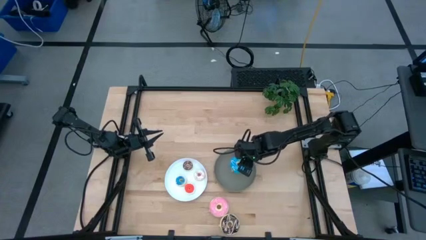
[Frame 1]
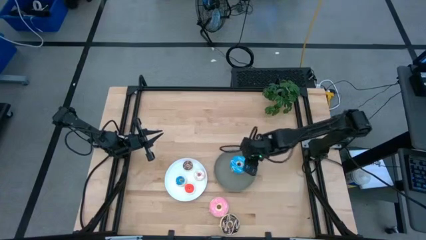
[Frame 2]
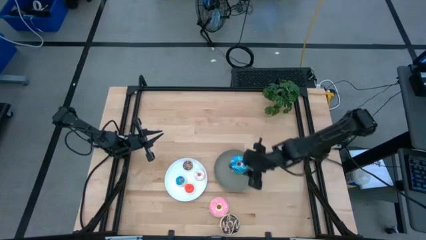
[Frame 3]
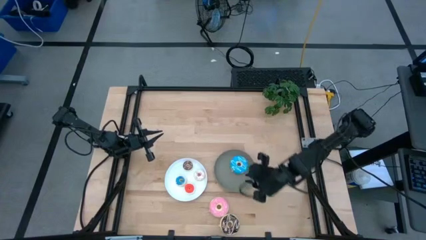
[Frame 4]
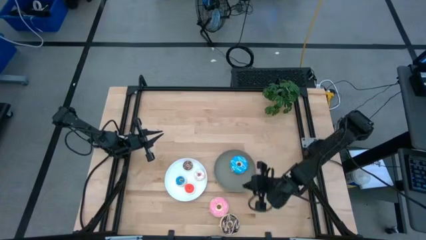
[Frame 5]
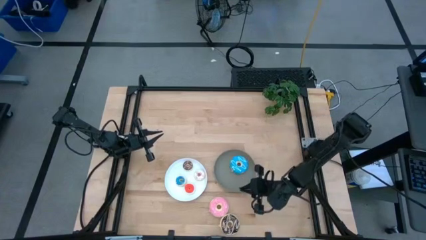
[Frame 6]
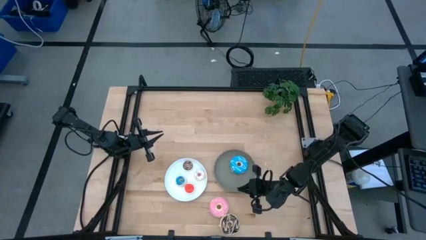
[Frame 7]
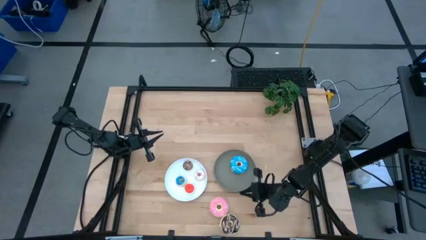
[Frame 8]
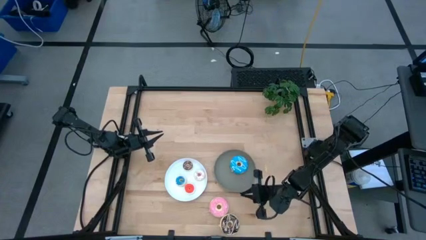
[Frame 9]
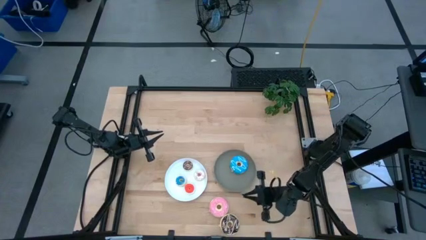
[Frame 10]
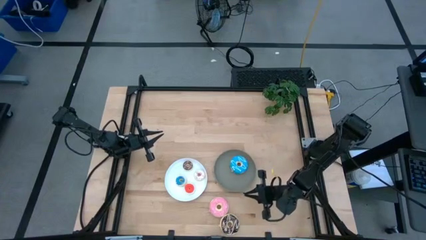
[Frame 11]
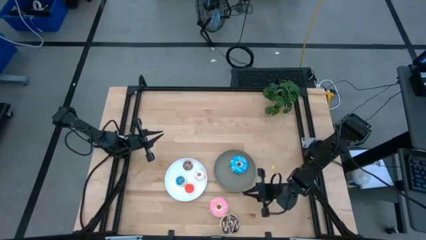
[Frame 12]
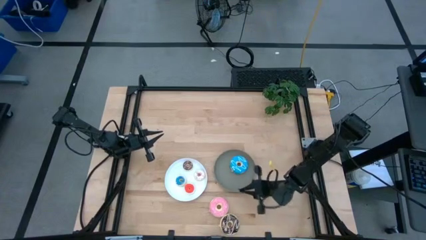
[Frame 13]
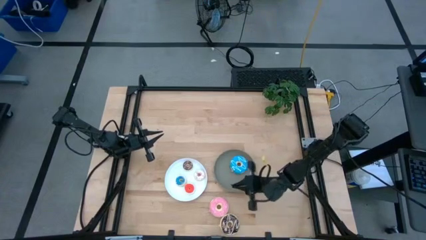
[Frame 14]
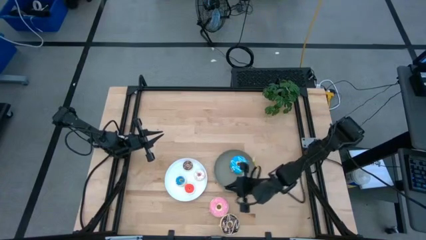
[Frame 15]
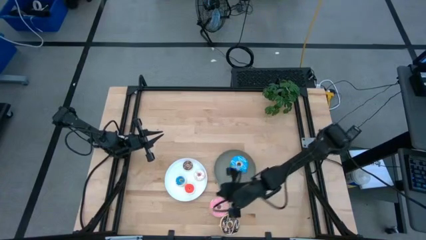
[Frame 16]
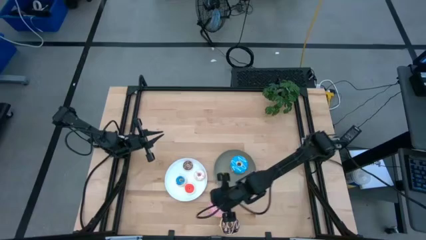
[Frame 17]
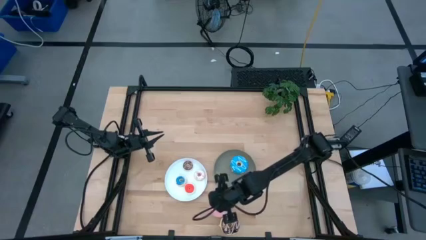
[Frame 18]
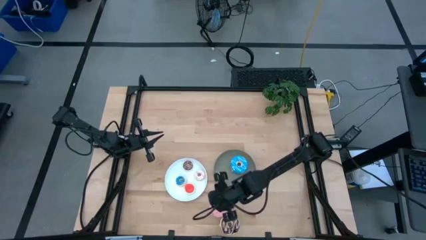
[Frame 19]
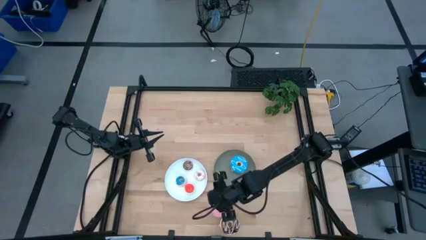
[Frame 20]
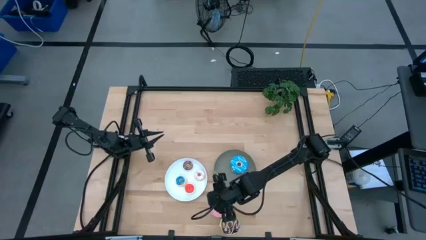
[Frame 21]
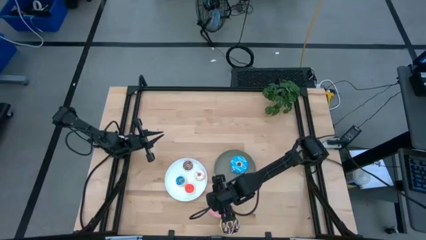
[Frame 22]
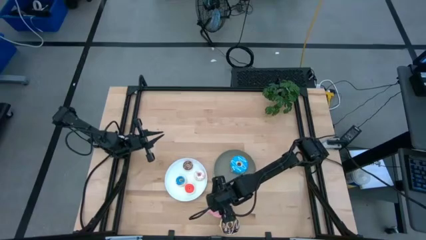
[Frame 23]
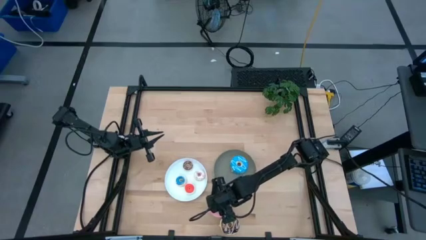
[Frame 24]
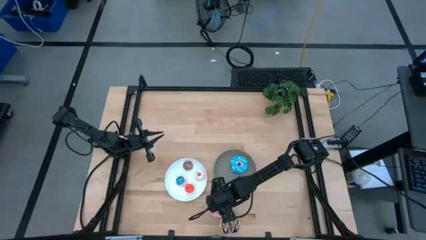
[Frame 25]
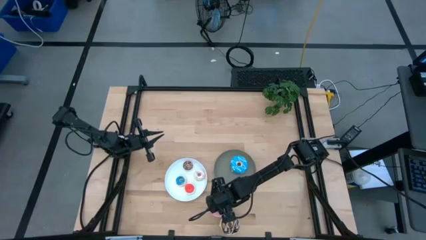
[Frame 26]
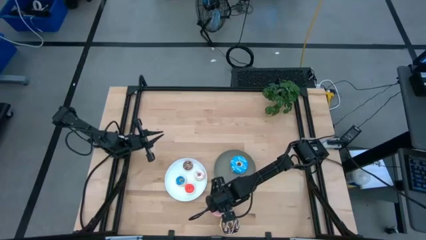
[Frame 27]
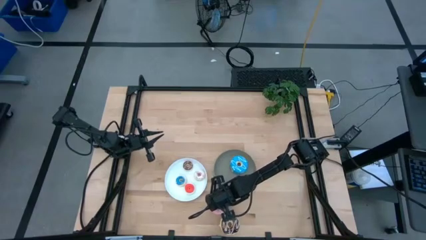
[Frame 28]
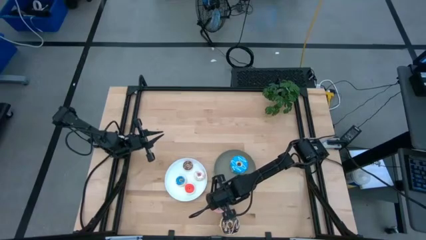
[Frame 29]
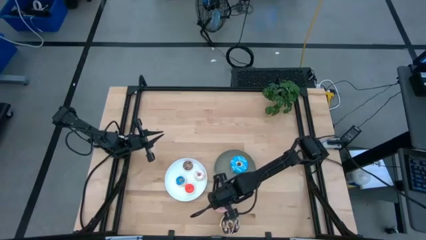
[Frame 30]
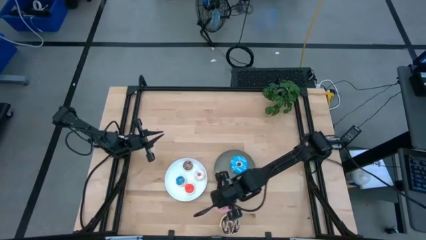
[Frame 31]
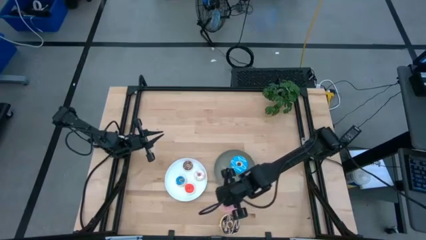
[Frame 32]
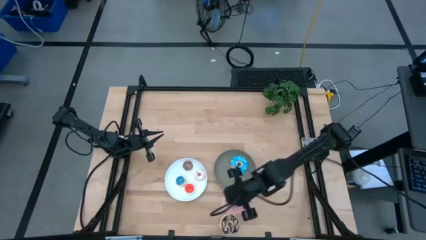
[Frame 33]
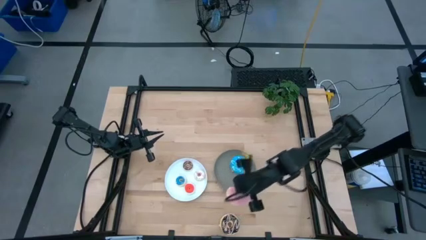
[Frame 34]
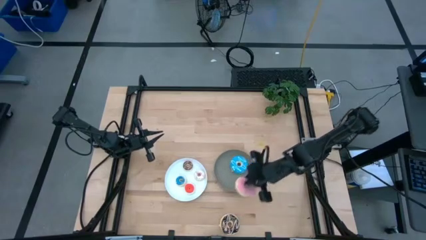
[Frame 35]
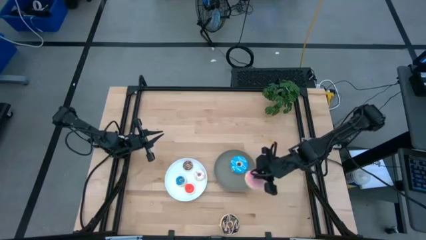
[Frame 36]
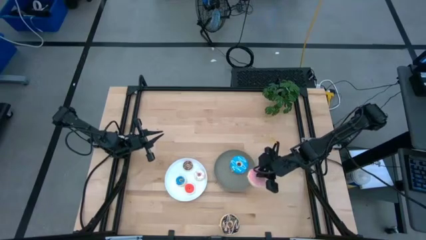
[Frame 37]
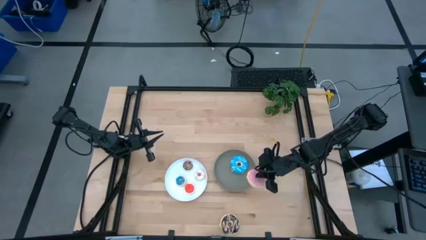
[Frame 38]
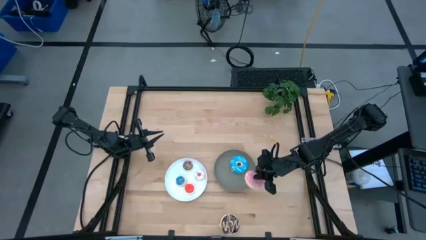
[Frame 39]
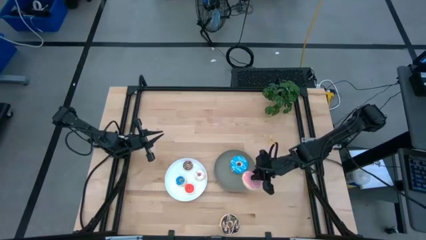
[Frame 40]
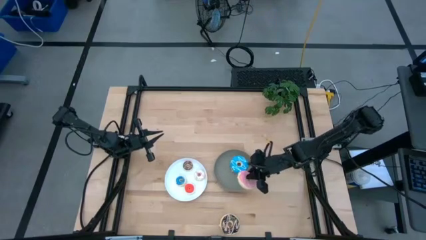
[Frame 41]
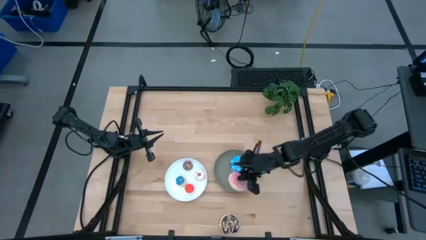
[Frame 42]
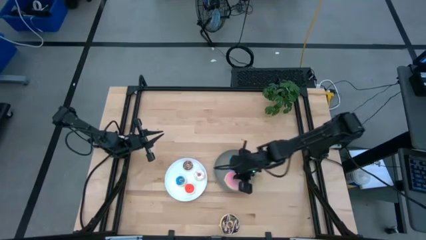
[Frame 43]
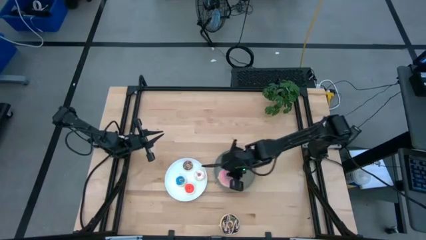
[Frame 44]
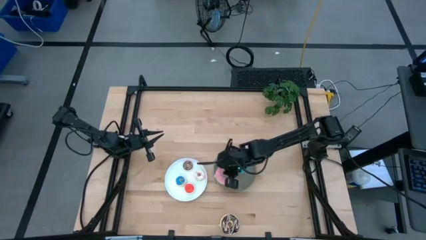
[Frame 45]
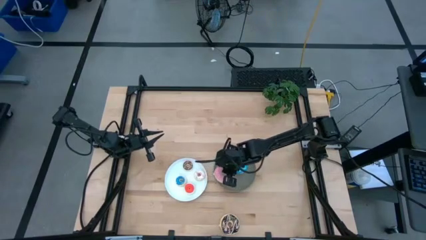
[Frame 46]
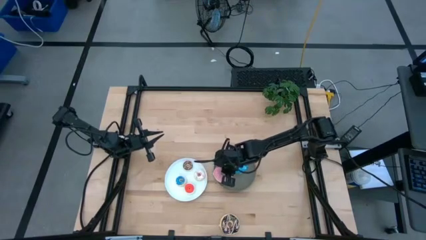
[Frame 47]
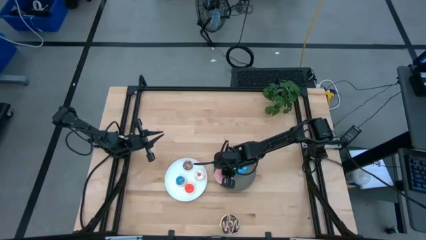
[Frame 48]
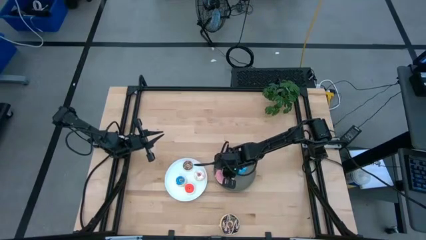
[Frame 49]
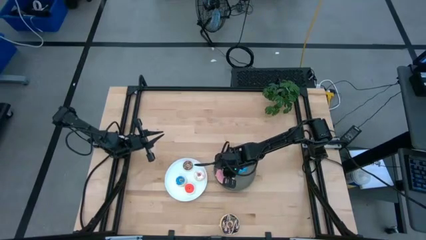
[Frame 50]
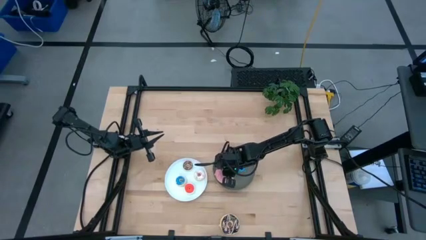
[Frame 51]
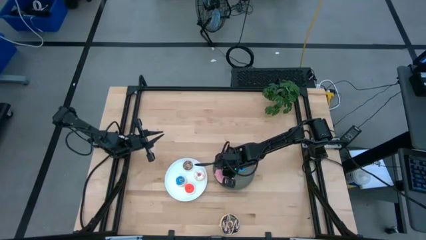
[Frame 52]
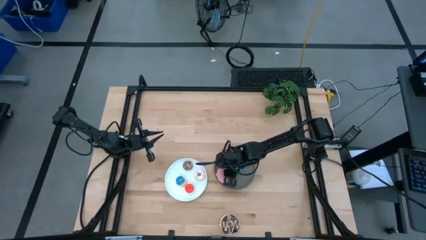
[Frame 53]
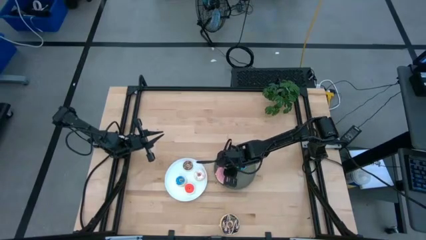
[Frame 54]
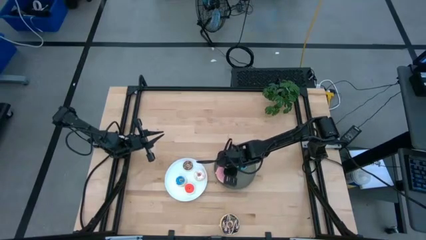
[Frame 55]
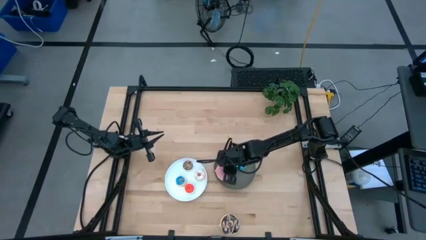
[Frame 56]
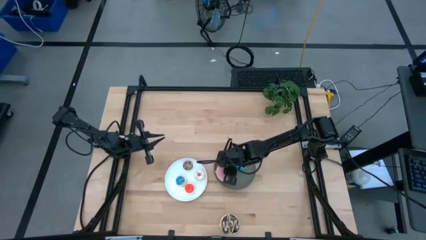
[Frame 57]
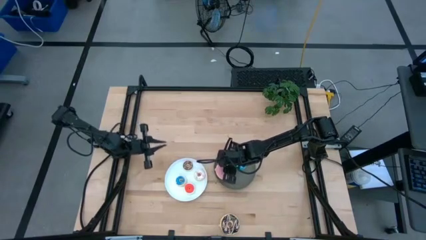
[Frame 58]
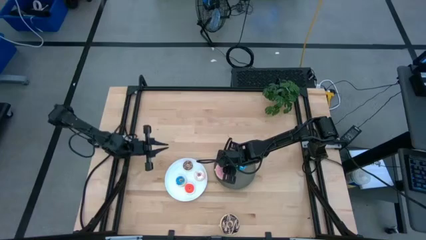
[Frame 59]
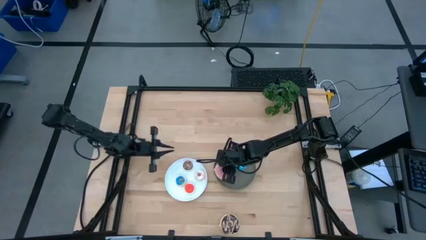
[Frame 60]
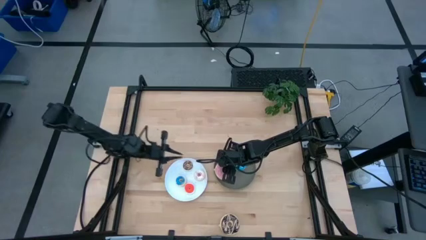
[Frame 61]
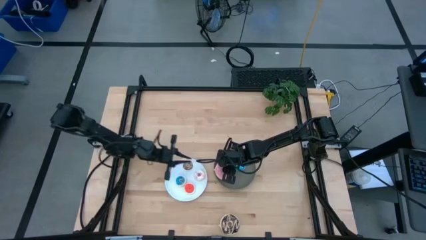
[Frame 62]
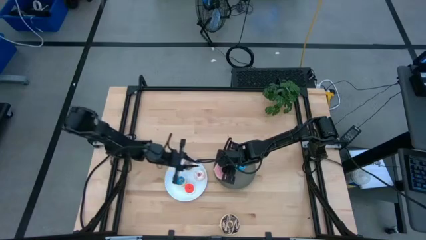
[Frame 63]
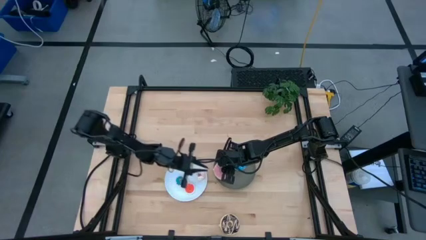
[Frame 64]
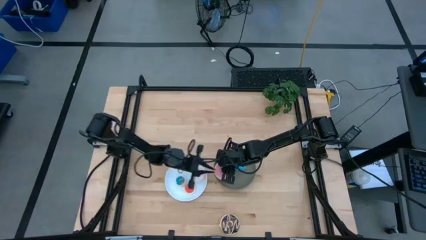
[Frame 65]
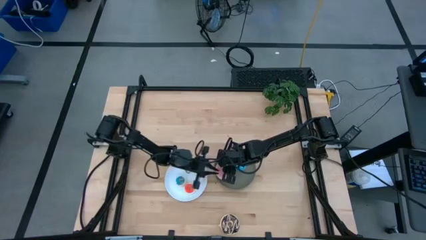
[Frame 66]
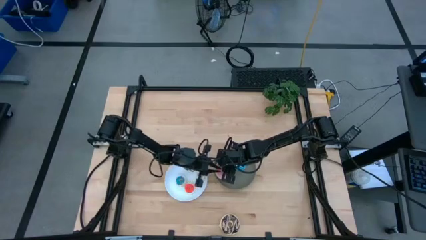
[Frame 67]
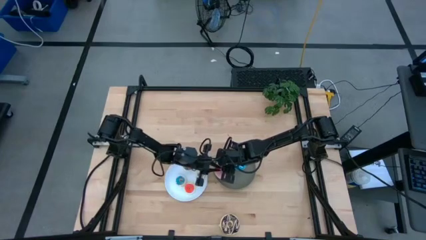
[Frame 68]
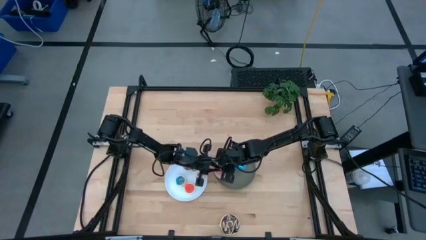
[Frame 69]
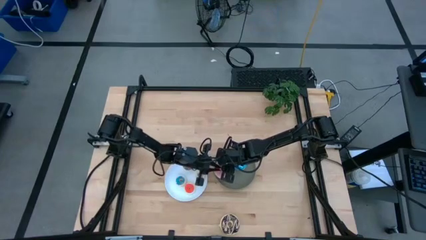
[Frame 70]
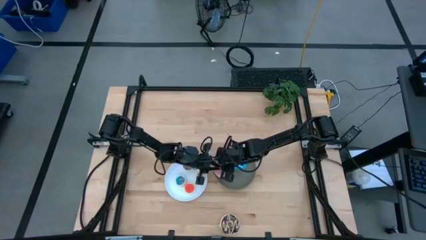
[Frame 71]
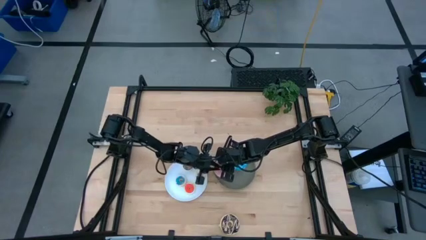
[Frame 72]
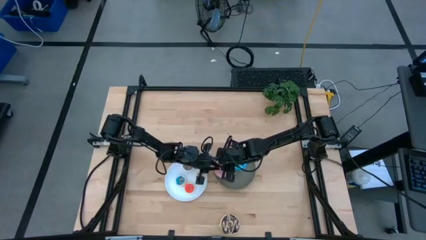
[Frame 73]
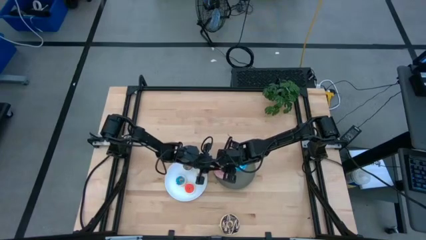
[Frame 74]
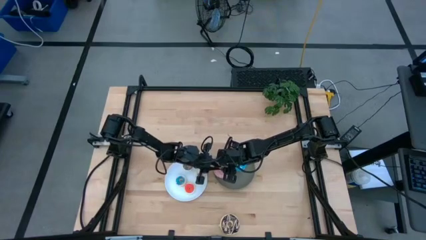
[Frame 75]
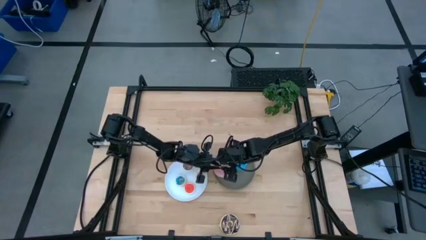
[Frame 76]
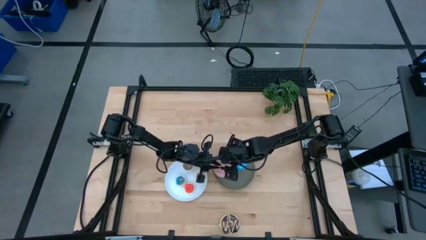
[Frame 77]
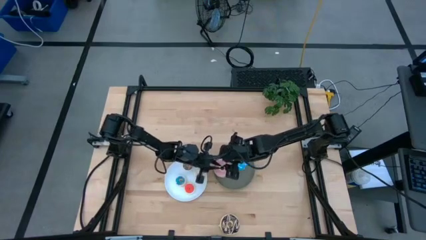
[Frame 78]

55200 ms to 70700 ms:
Task: Pick & Place donuts
Put the large pink donut on the gray plate
